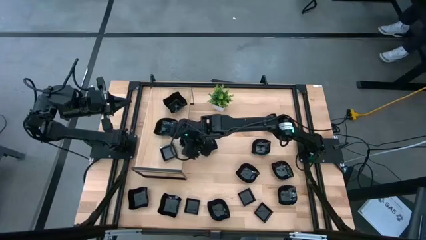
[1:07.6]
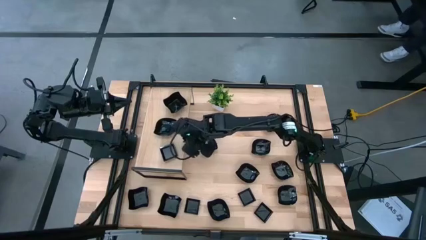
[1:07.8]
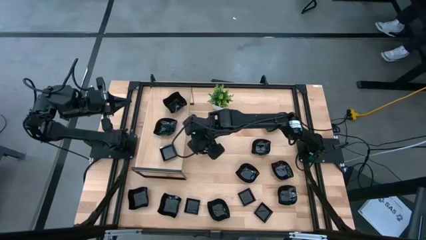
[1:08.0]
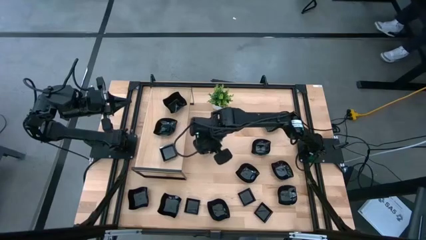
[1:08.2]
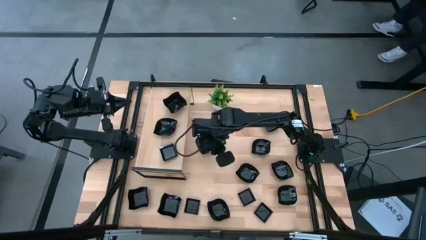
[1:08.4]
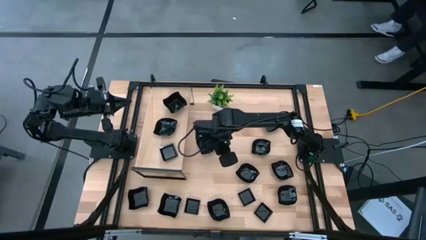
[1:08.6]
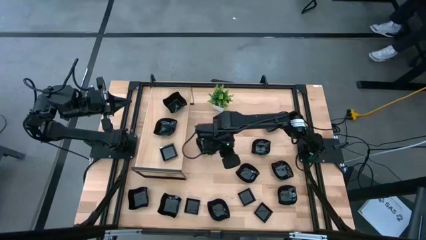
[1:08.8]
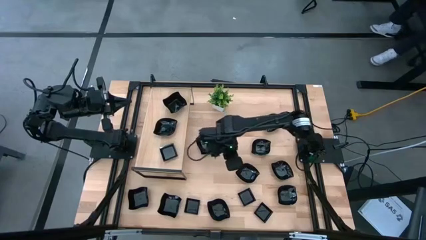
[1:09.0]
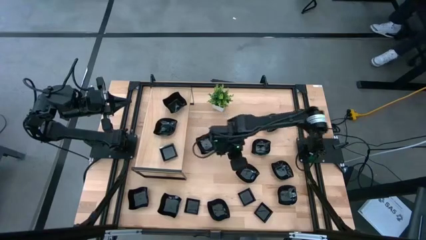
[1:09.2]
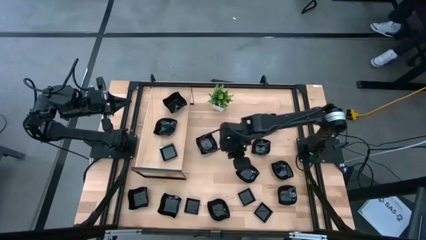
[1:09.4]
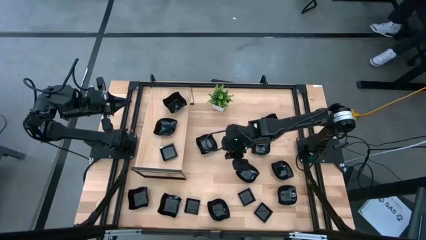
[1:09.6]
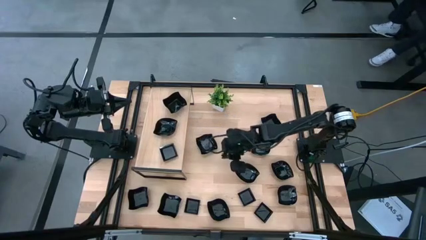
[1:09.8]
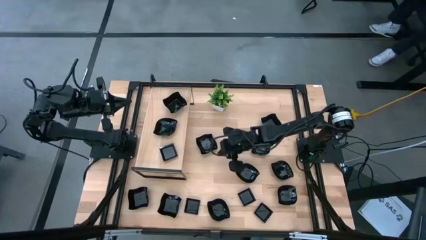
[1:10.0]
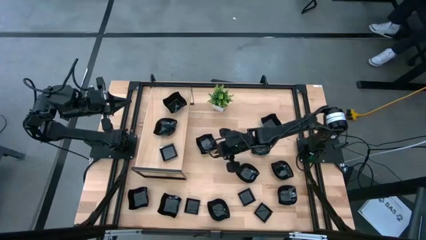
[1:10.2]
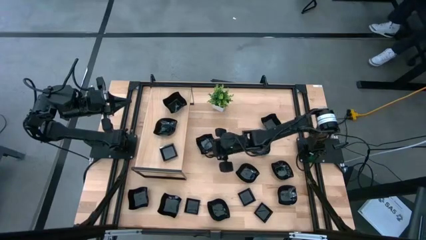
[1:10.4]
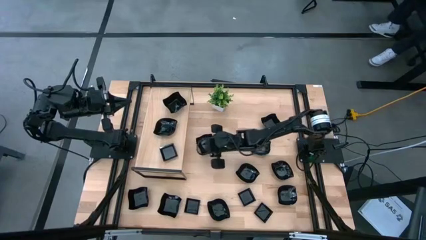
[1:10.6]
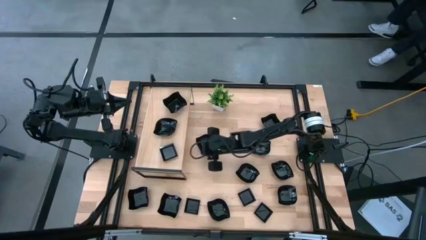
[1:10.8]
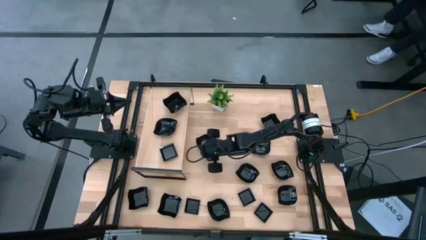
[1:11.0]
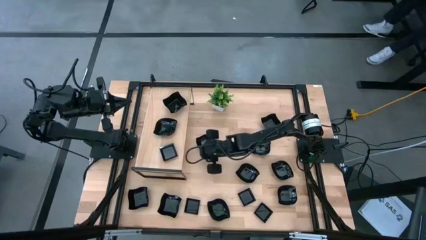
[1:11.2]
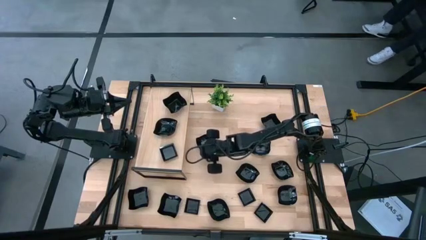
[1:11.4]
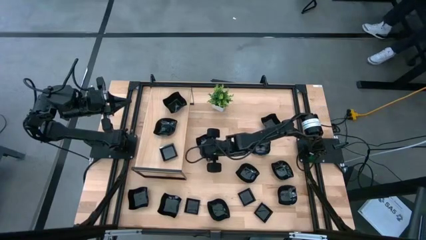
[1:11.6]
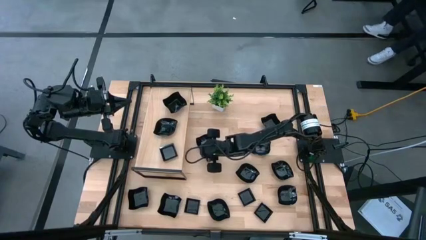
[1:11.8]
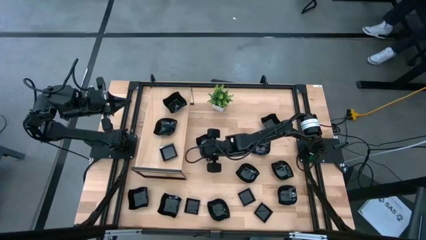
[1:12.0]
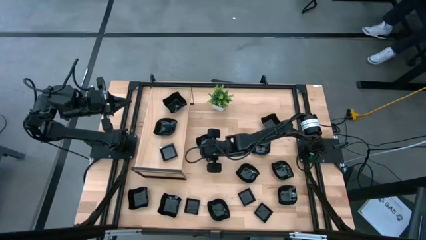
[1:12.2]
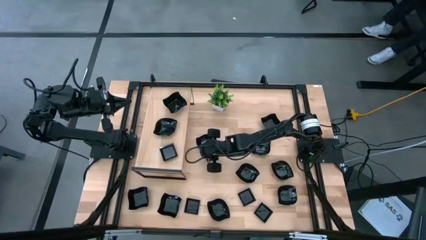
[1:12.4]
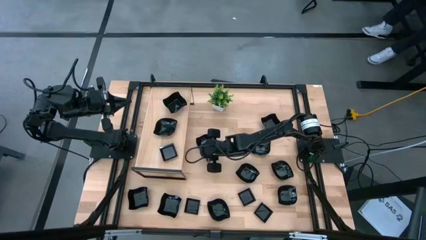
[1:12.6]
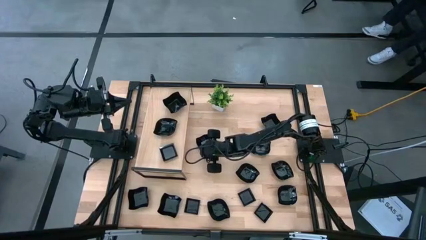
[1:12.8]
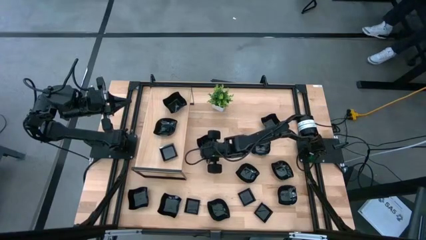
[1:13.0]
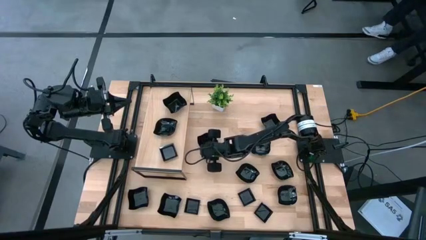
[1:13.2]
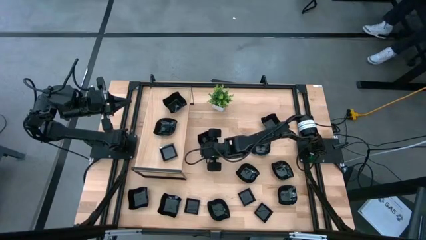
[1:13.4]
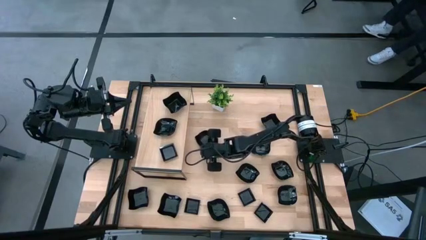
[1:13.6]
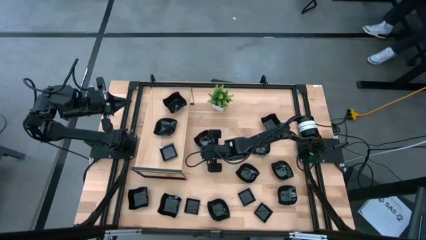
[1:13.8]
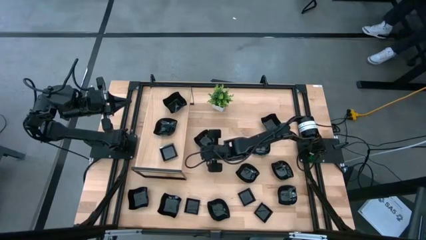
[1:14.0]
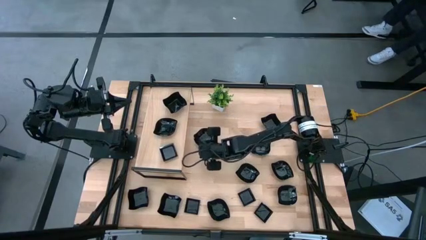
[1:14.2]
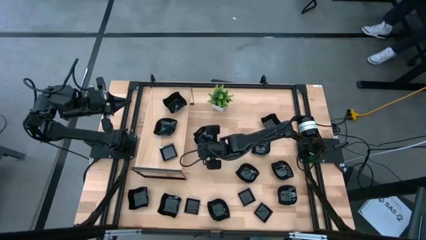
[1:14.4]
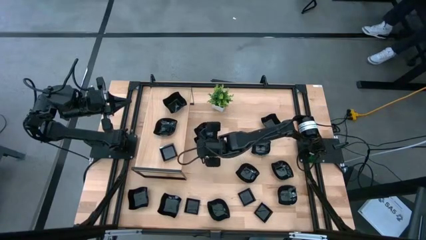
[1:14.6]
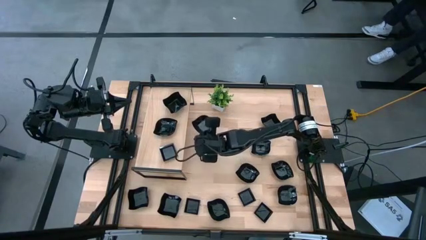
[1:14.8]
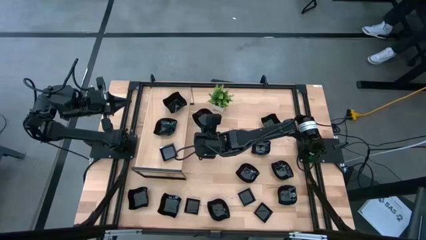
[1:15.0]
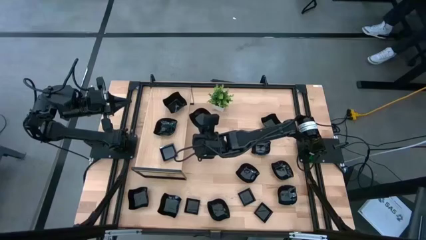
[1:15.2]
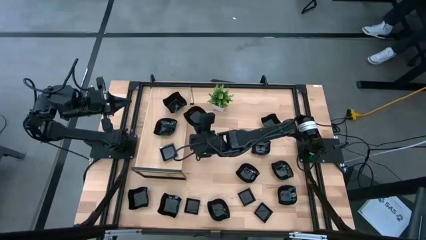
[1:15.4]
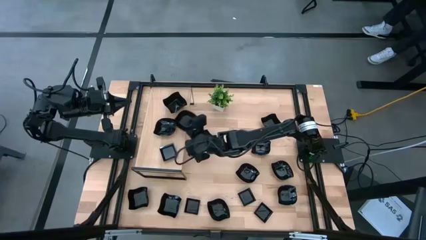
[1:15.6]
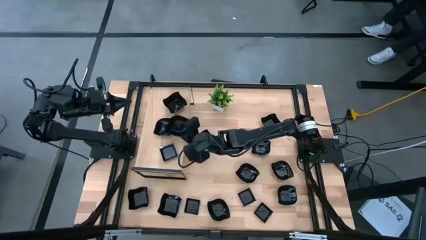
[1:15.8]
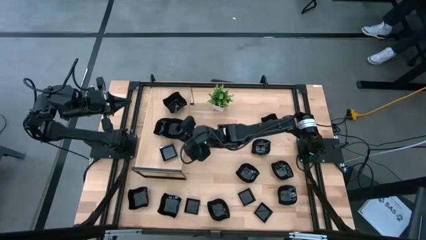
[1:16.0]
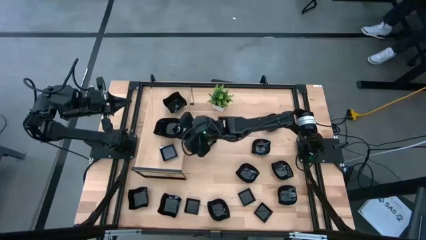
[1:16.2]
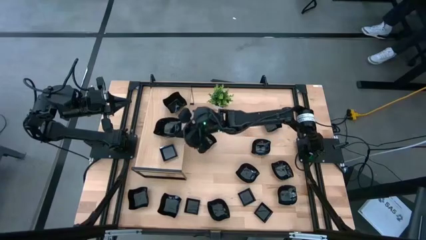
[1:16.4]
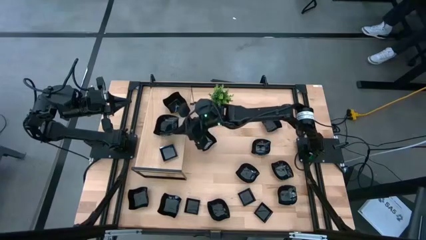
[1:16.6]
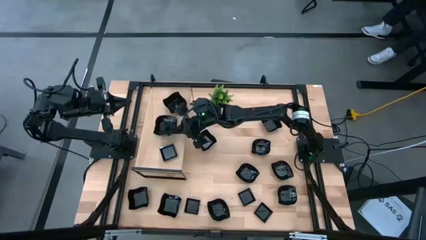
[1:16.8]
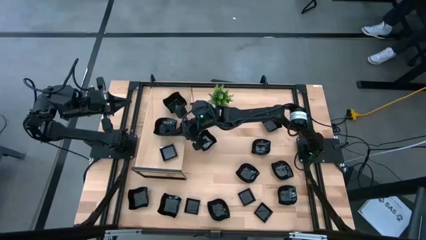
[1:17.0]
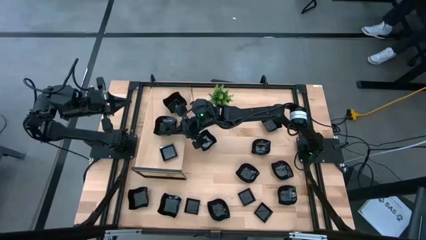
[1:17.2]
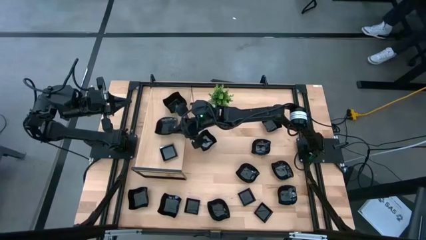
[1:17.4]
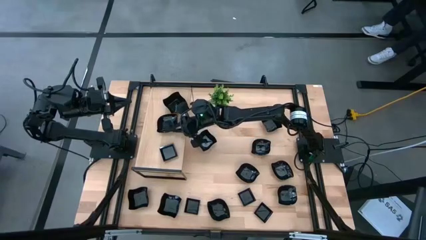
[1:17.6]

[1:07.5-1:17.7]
Task: Pick & Place Mini shaped plates
Stack the black leaf shape bowl on top of the black leaf shape bowl on the shelf

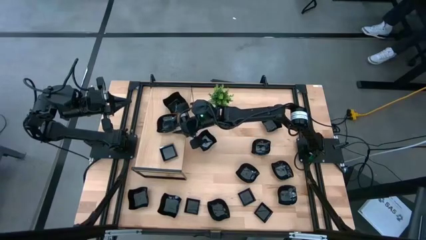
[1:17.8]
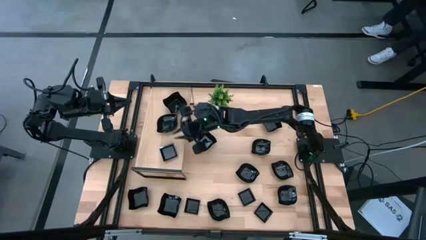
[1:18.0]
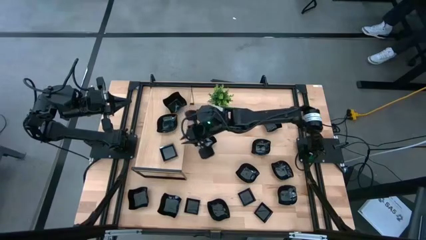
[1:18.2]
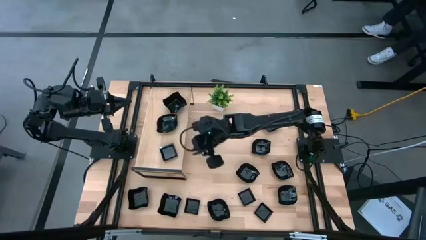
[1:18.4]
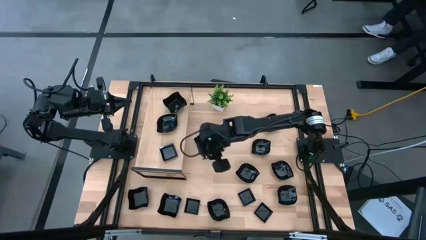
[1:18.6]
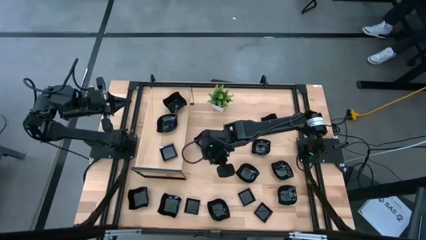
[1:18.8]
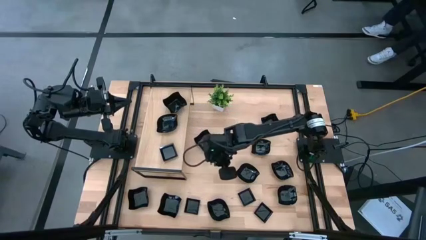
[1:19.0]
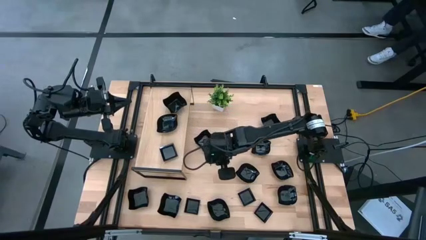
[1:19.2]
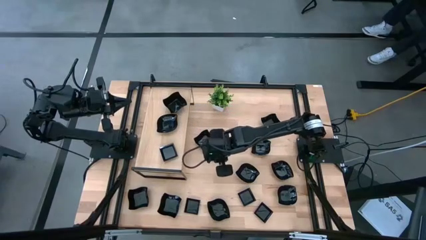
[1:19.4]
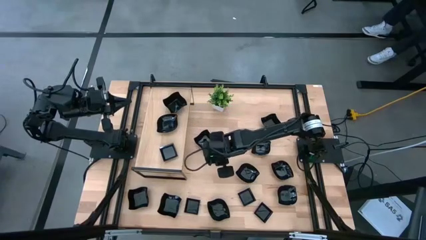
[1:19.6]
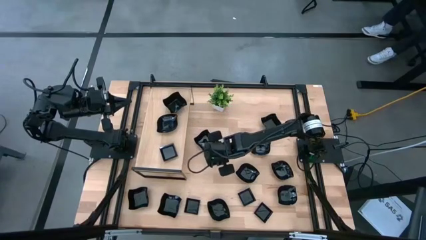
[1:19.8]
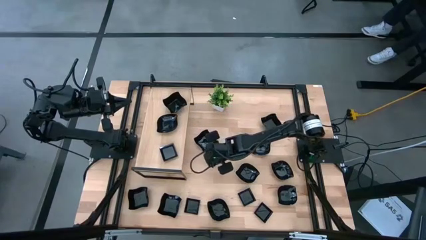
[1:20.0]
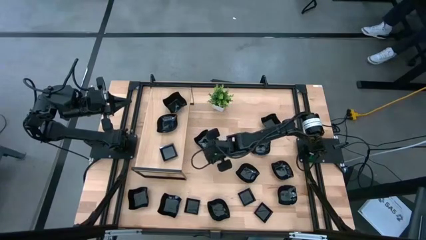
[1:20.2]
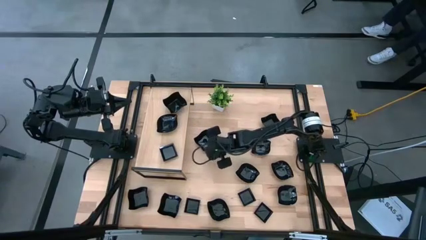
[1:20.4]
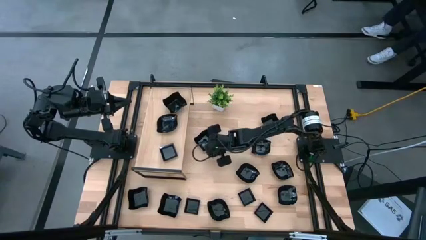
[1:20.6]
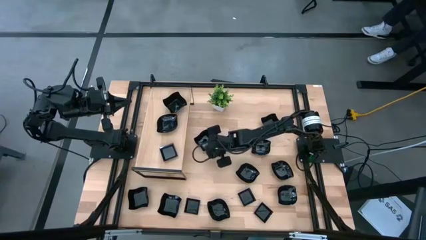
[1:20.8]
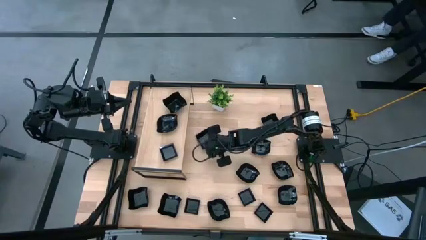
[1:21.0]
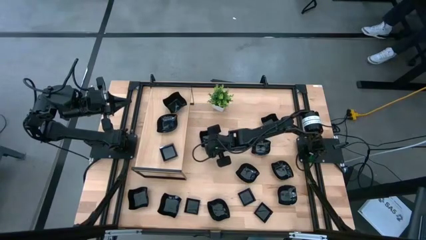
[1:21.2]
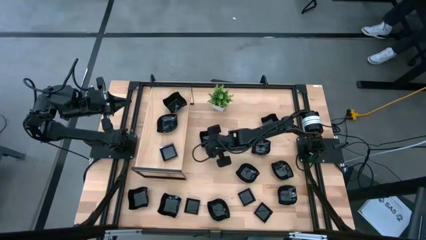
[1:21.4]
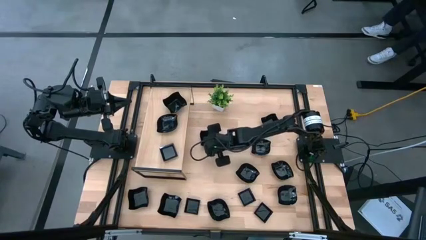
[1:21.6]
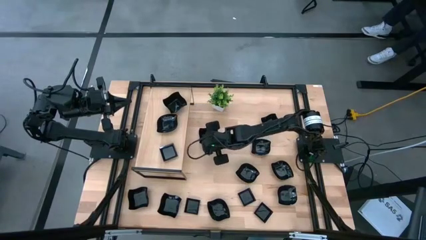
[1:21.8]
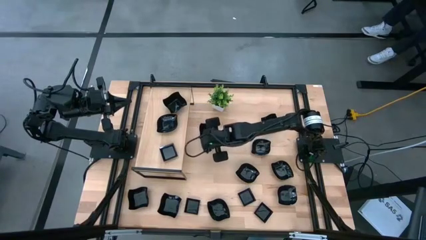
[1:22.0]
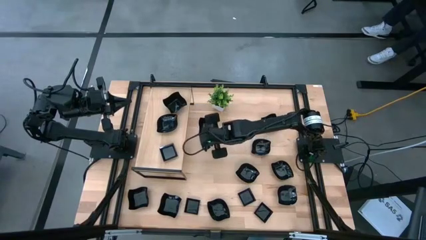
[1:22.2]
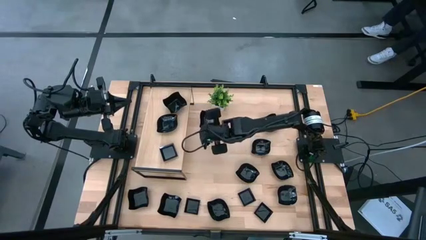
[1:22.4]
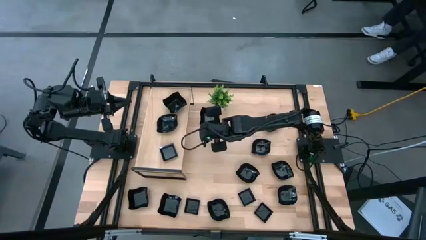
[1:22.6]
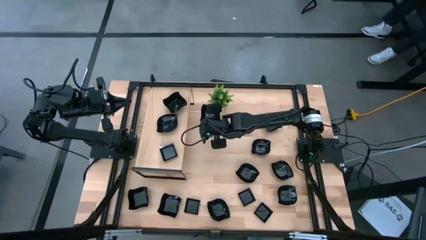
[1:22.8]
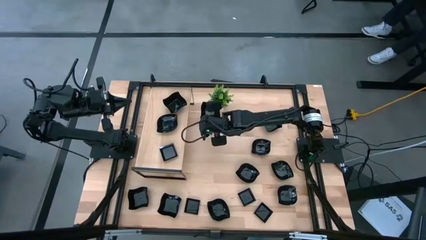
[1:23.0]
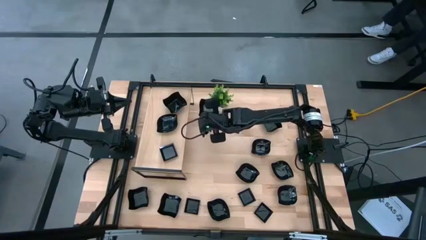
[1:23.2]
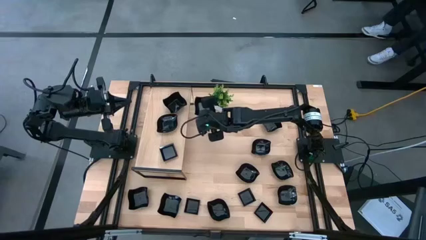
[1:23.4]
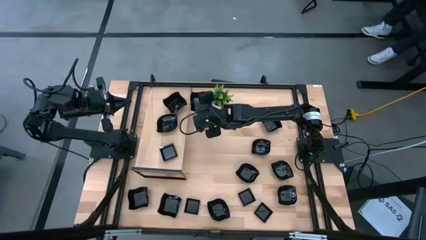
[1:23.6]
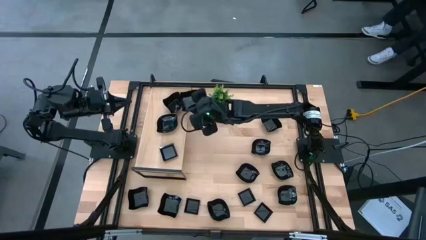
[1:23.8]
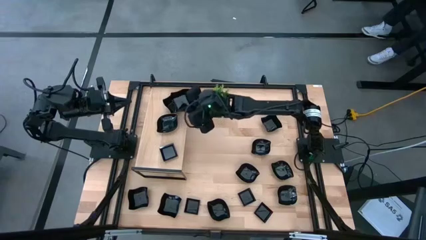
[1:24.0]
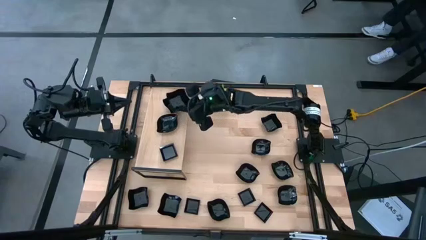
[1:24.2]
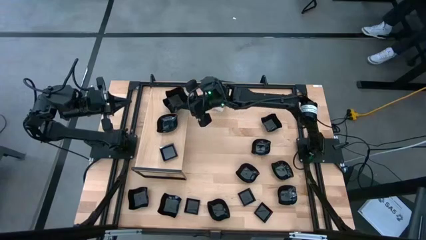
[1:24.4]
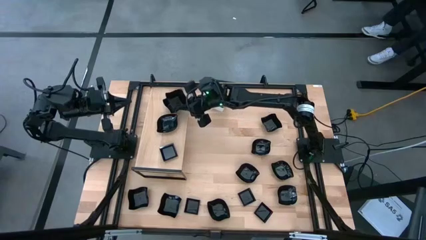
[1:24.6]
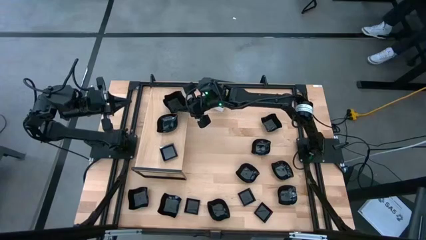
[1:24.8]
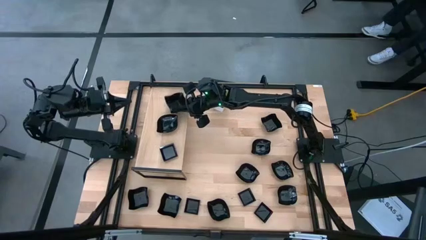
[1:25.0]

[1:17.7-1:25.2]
Stack the black distorted square plate on top of the black distorted square plate on the shelf
